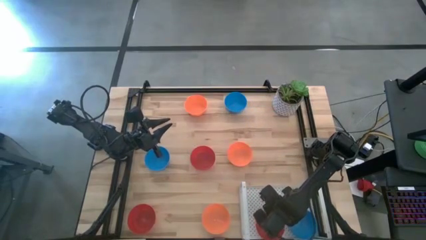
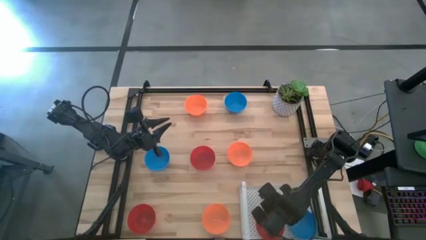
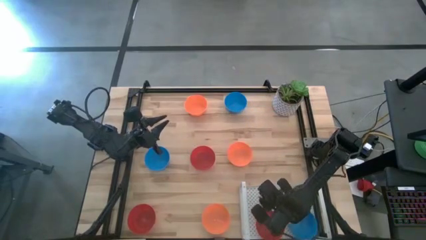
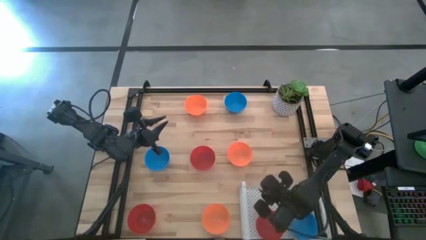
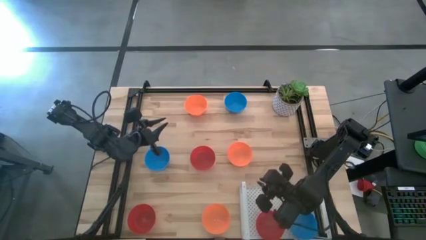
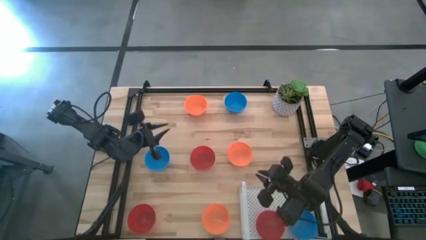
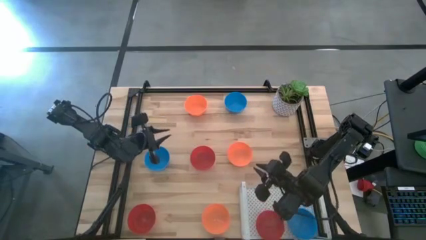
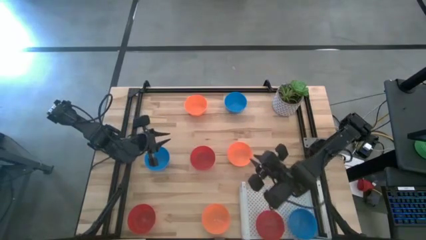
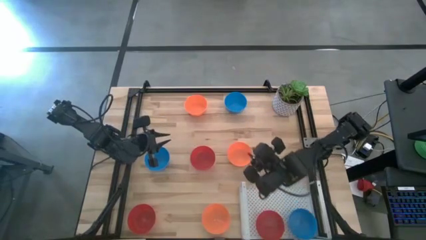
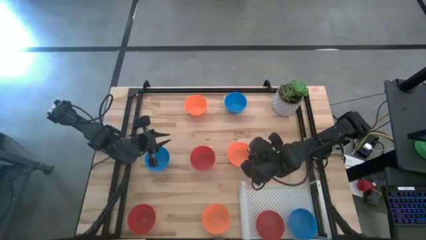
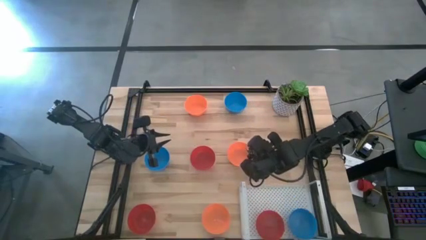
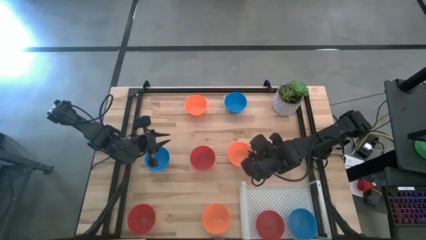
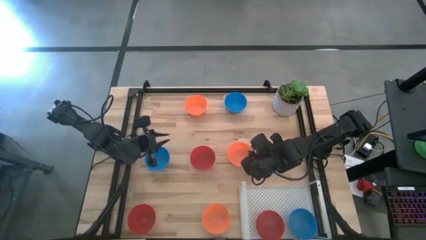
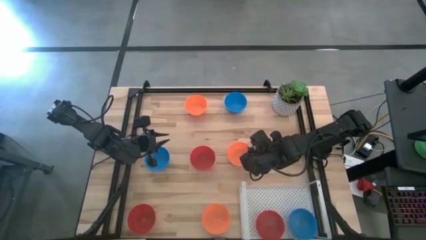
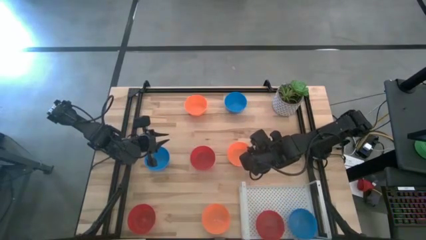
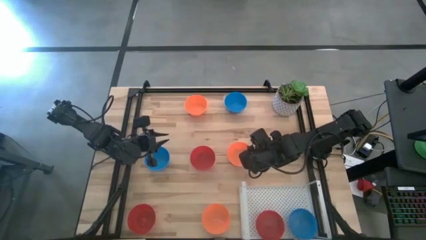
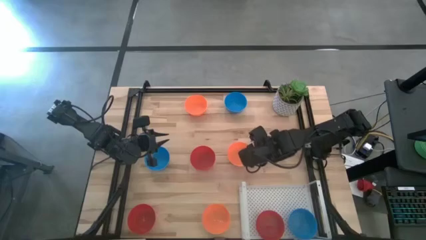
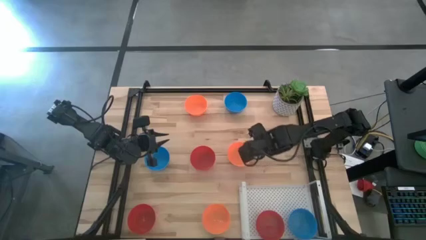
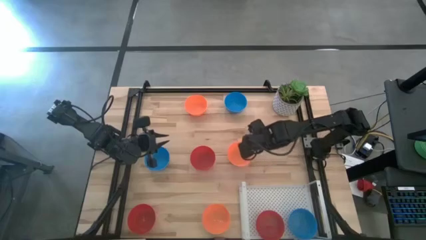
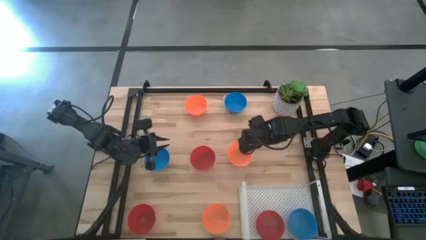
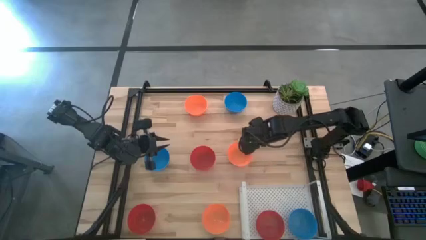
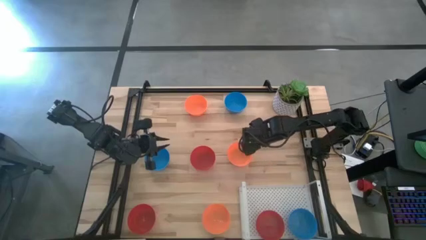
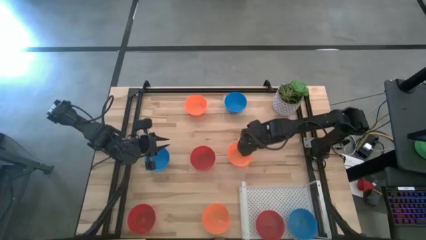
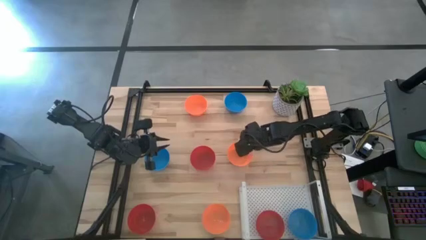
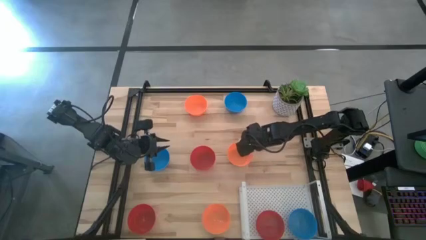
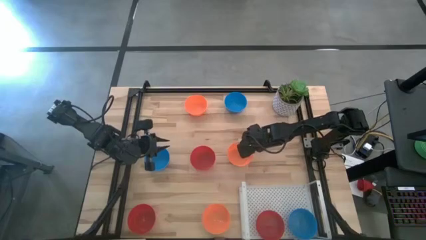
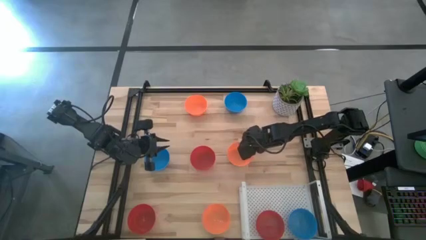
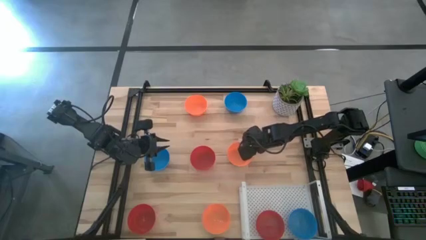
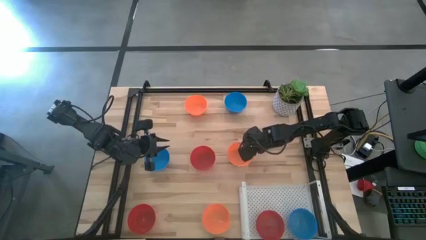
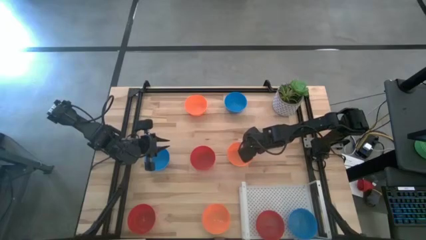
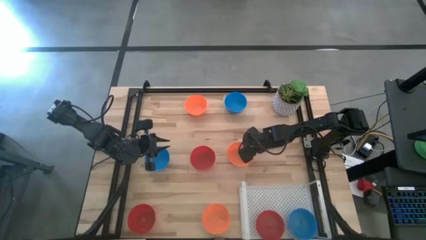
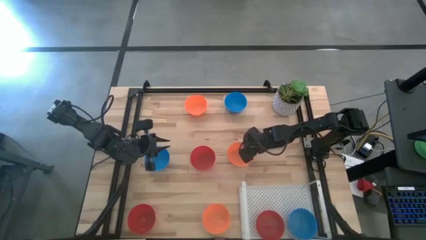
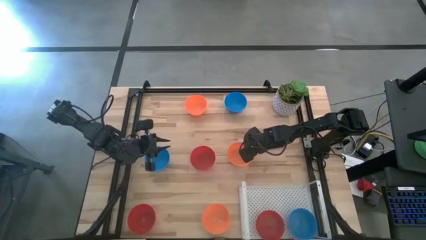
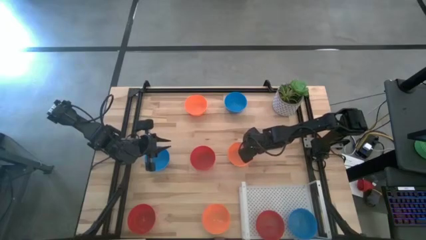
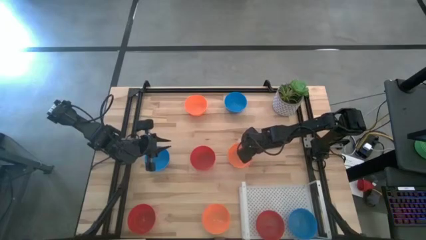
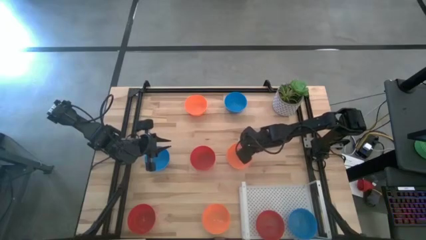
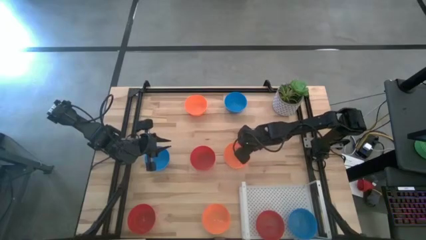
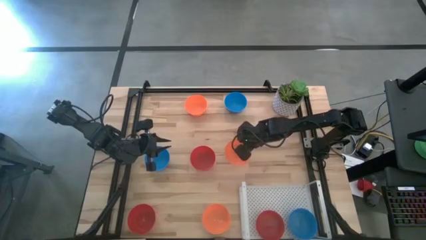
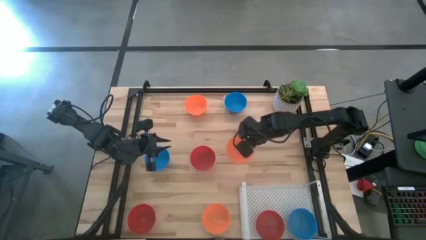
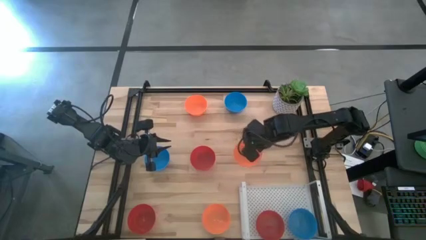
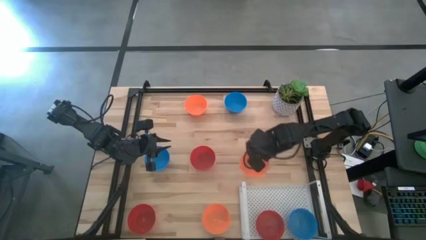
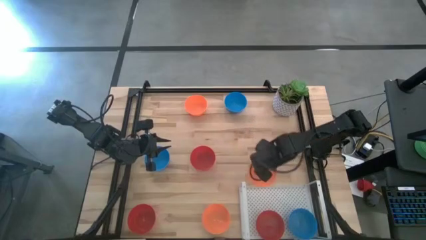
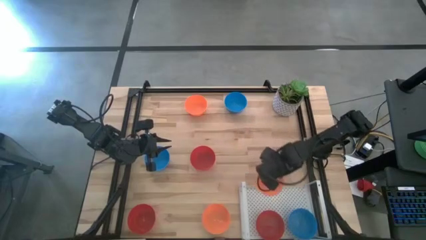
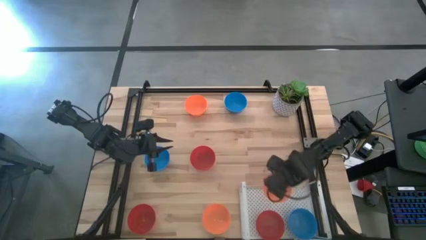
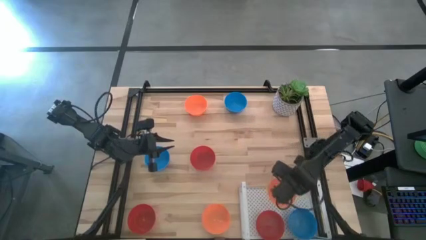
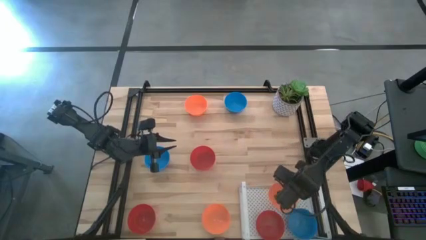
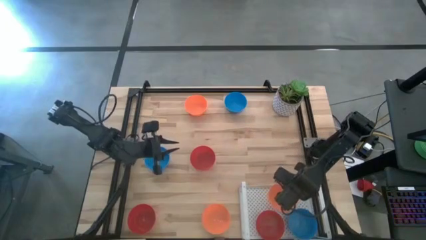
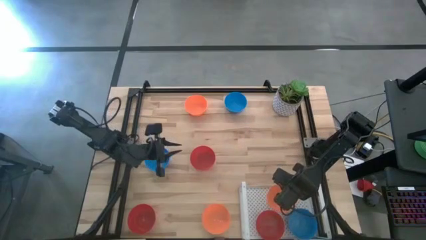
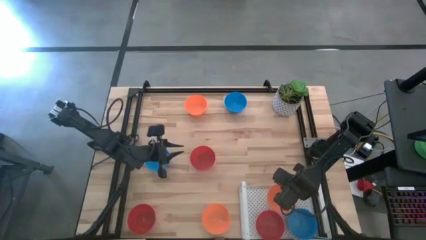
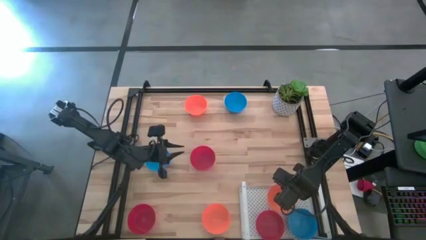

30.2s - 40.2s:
Task: Pick & Place Mini bowls
Put the middle orange bowl on the shelf

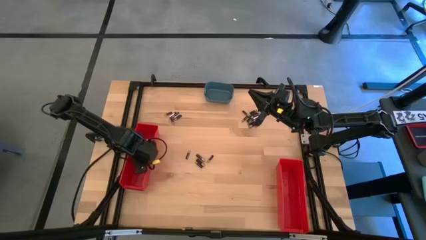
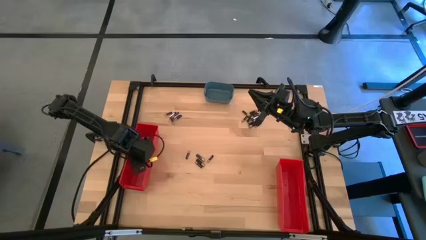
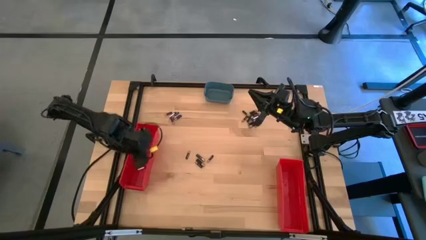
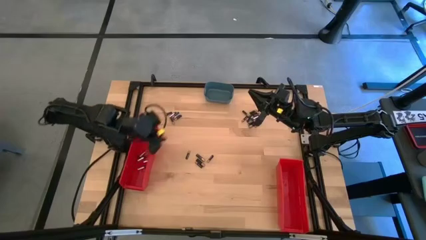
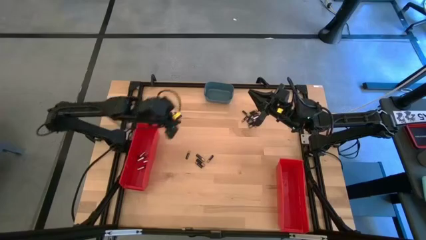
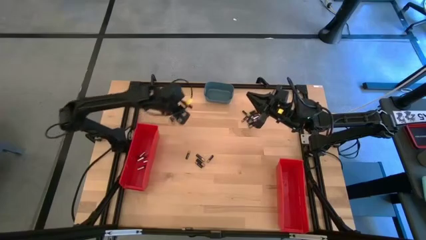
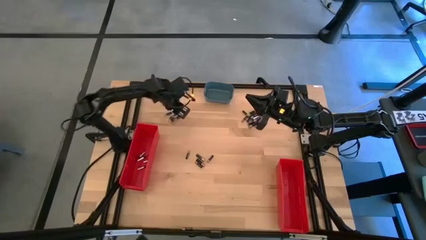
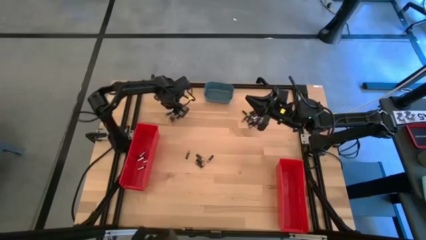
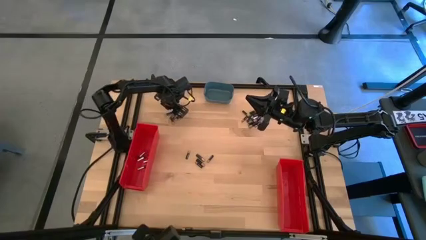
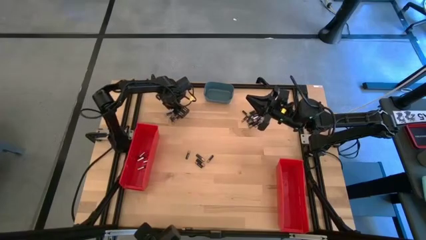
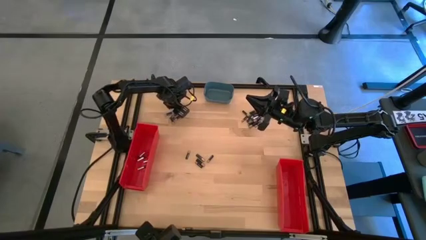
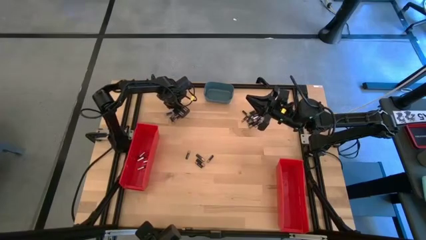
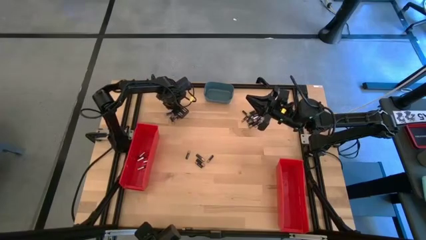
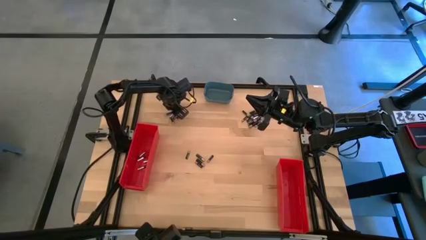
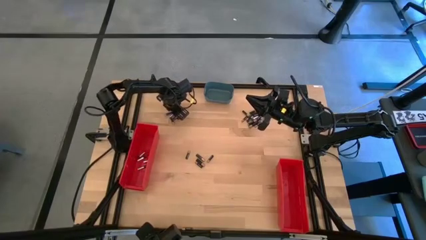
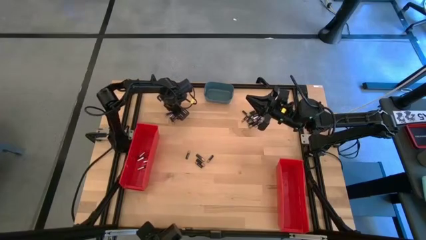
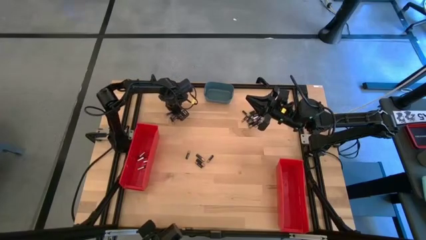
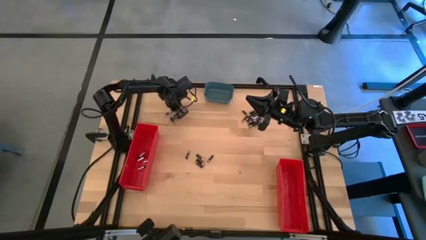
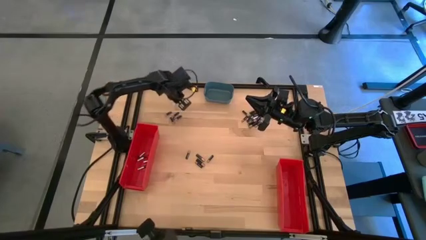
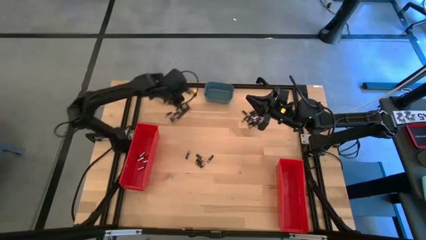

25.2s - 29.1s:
Task: Sort batteries
Put the silver battery into the left red bin
